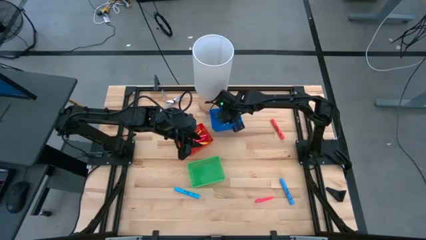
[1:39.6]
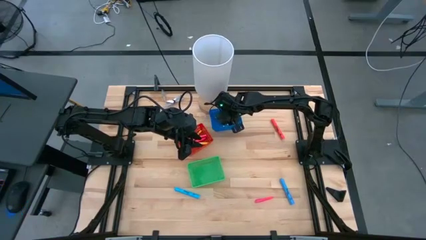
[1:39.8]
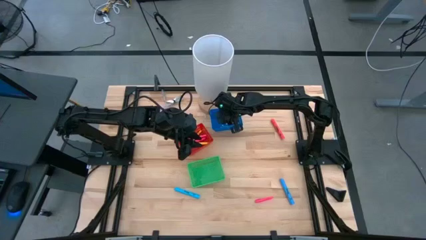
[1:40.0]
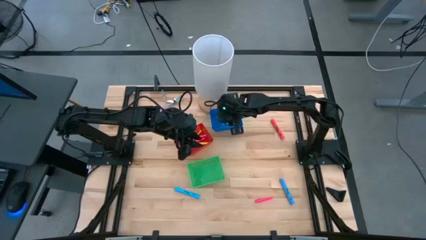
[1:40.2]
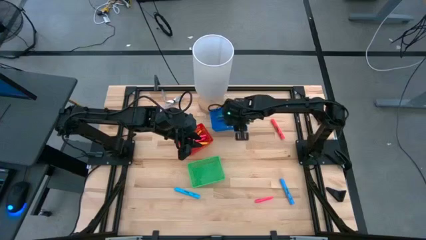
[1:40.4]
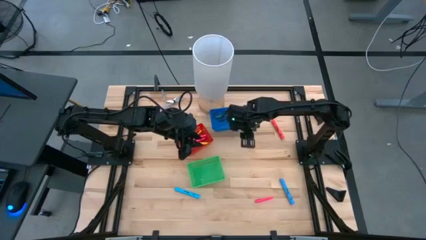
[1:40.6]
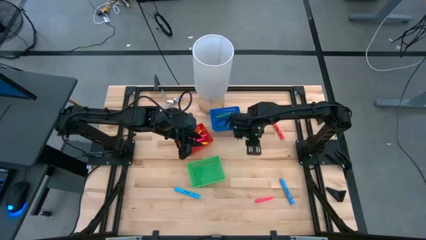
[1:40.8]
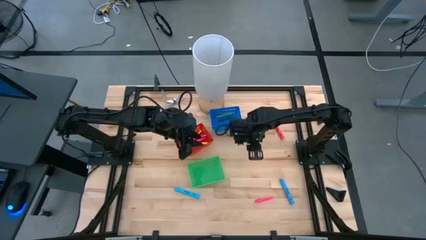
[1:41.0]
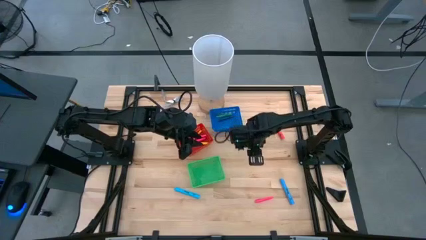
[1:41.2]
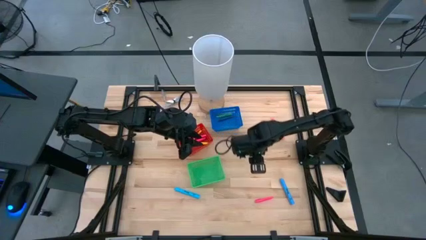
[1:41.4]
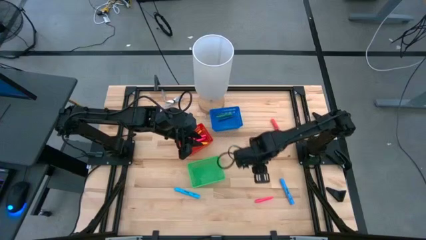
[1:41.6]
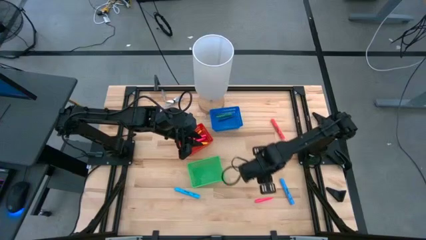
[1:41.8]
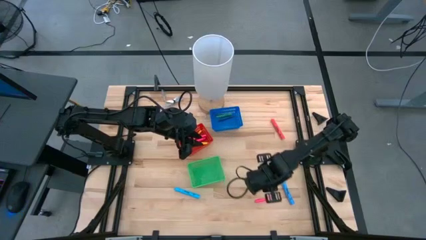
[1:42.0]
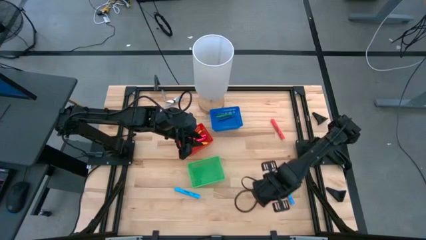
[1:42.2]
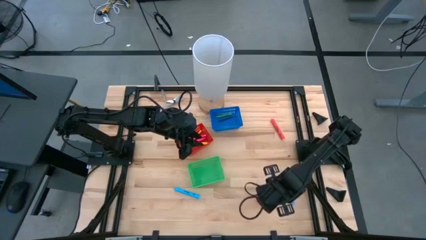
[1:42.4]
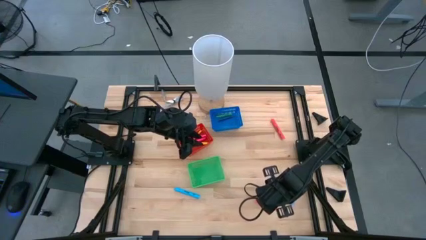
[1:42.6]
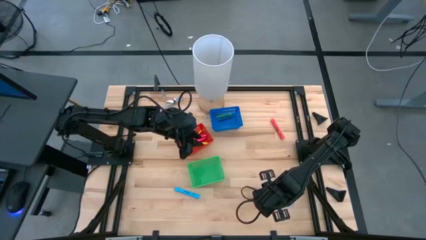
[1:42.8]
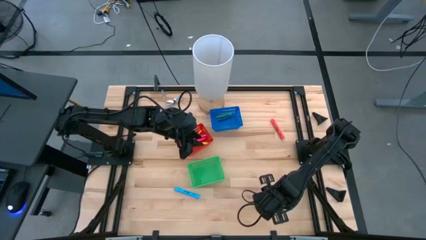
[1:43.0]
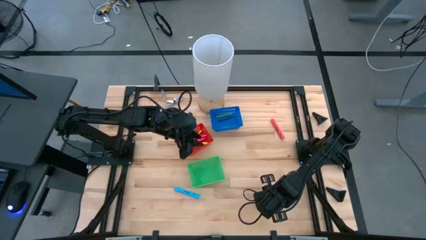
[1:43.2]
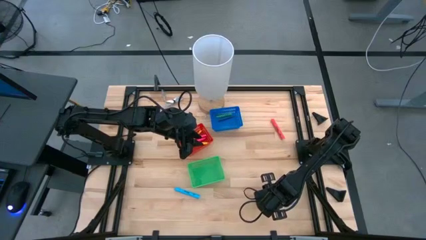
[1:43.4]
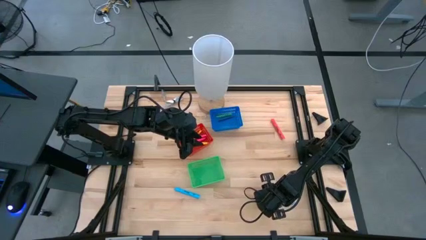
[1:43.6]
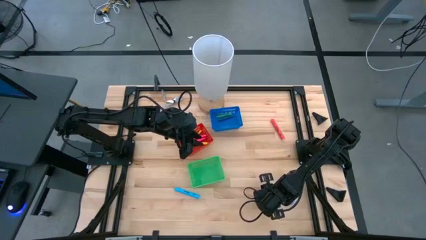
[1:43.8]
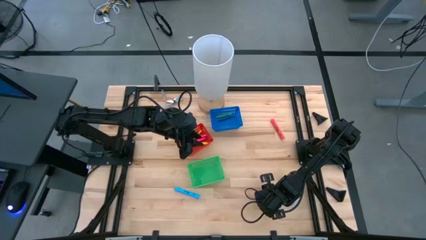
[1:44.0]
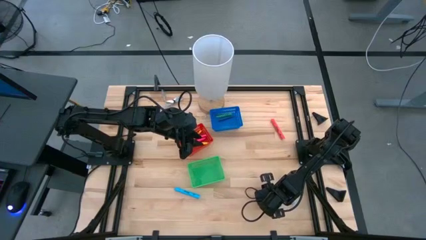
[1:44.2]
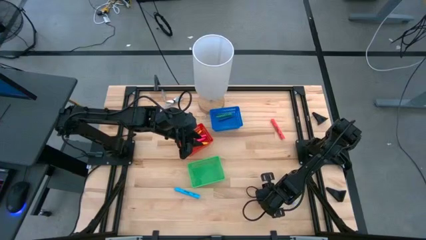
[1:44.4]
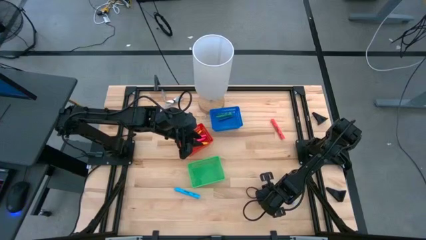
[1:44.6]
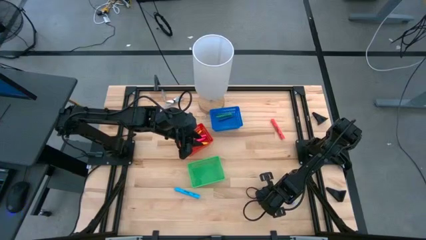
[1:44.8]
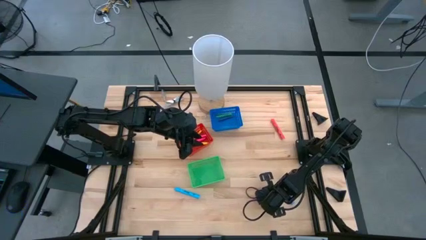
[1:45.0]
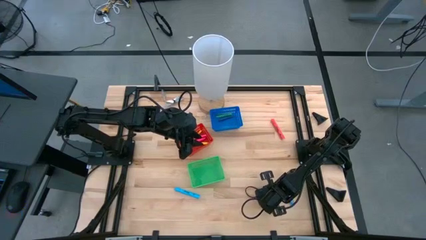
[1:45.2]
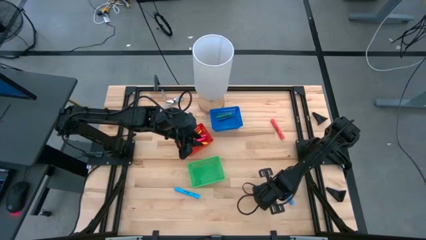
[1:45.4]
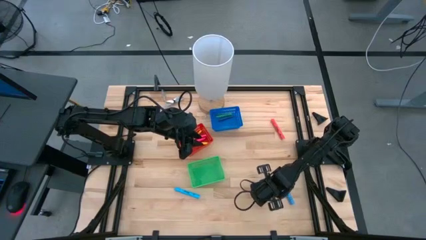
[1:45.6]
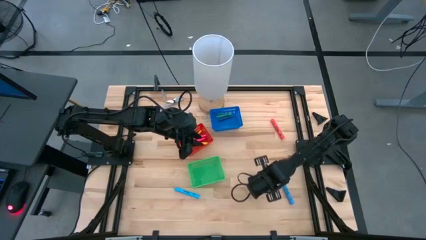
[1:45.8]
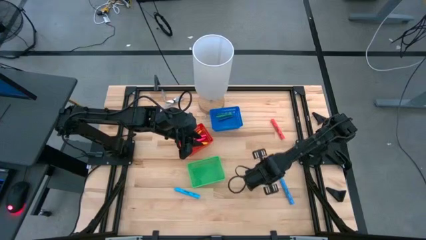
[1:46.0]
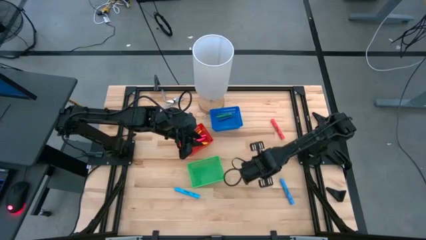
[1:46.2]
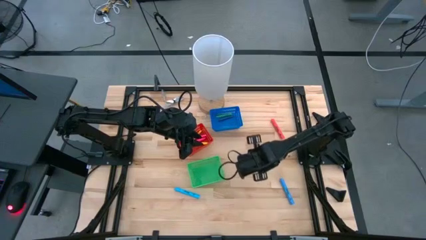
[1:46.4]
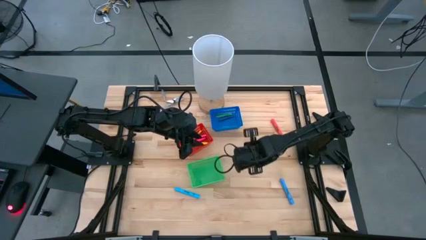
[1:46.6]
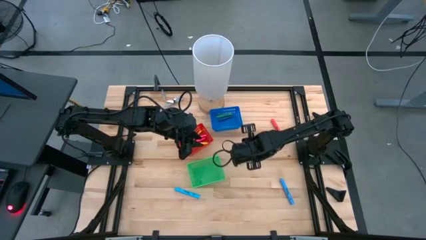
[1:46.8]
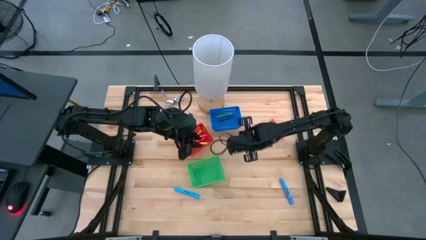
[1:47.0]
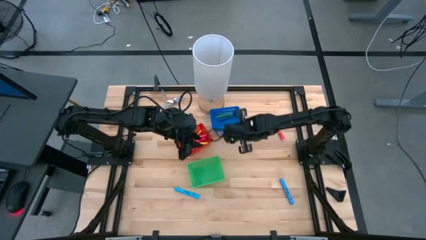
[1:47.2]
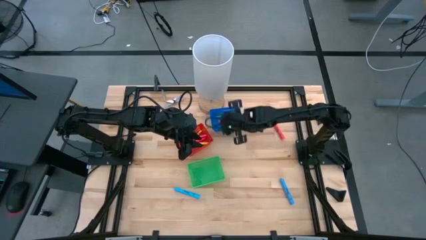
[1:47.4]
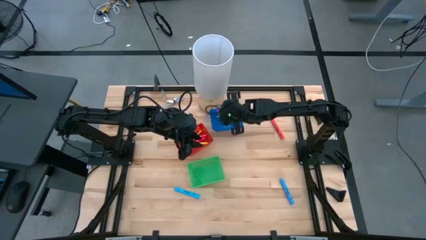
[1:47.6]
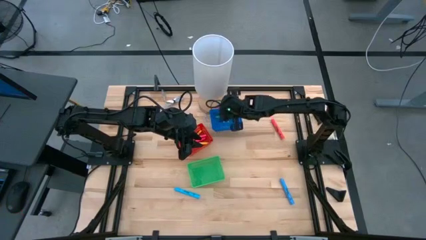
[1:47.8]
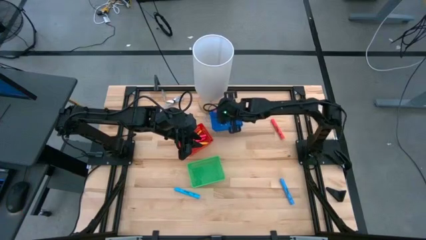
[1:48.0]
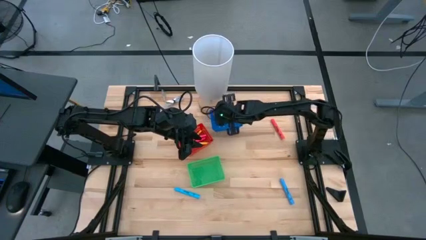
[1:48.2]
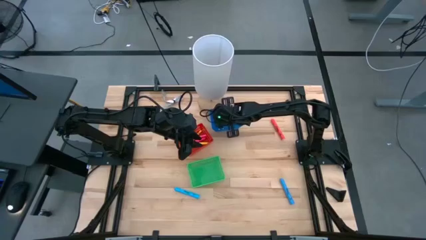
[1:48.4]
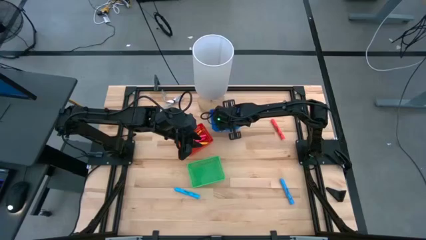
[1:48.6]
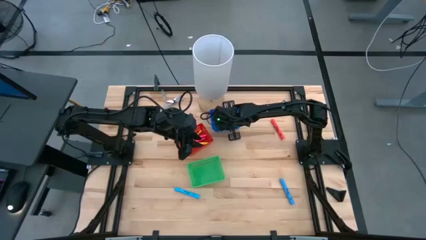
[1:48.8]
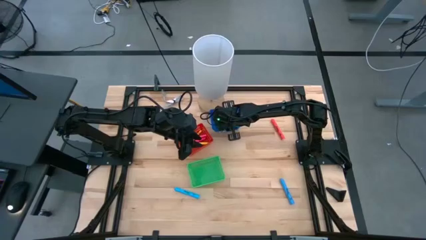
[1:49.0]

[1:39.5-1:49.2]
Task: Pick & Place Markers
Put the pink pen into the blue bin

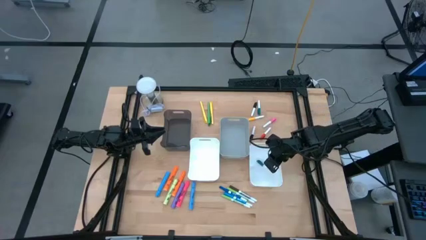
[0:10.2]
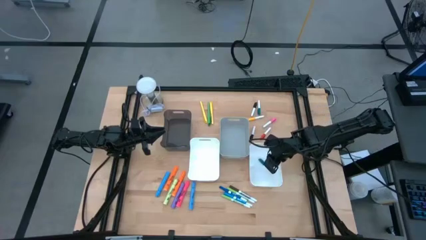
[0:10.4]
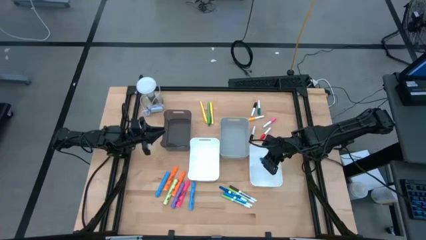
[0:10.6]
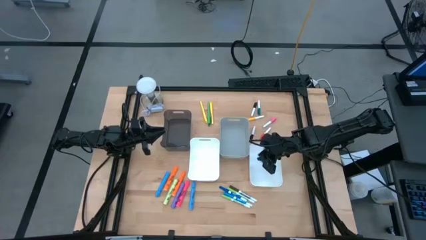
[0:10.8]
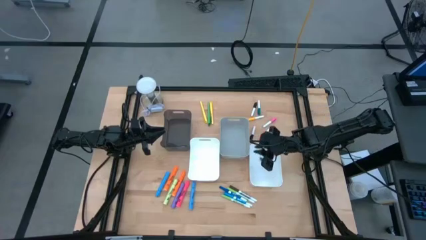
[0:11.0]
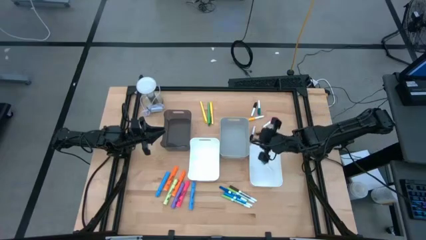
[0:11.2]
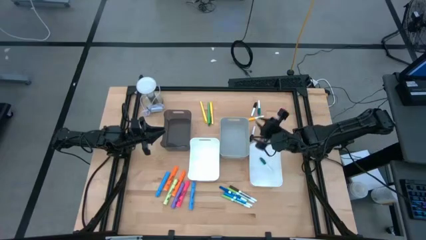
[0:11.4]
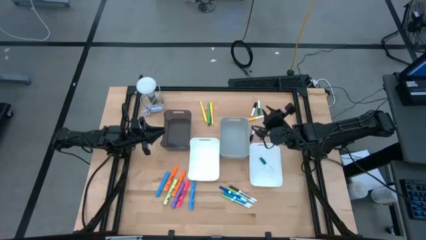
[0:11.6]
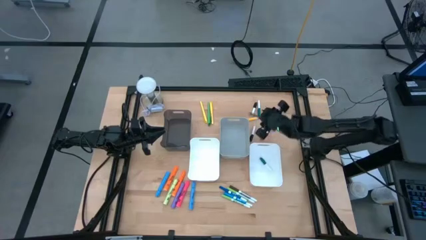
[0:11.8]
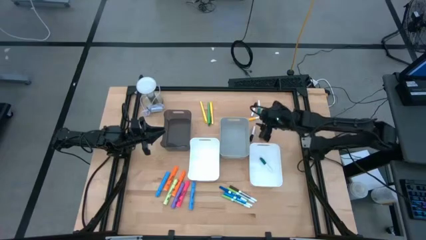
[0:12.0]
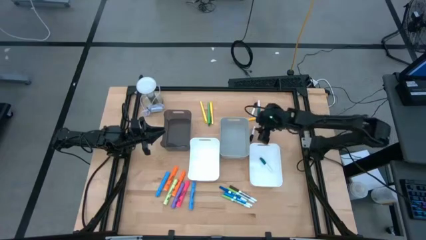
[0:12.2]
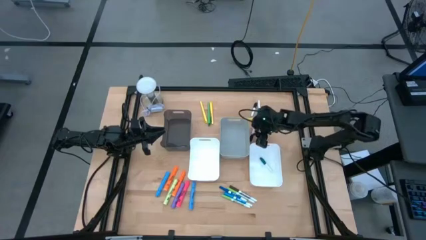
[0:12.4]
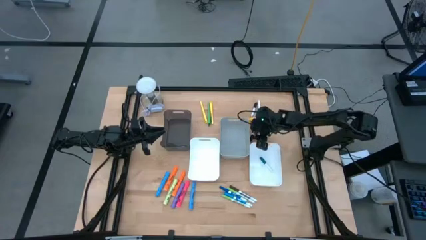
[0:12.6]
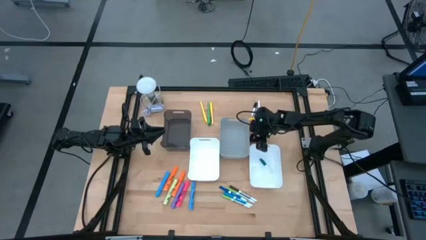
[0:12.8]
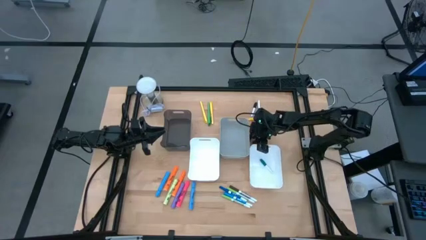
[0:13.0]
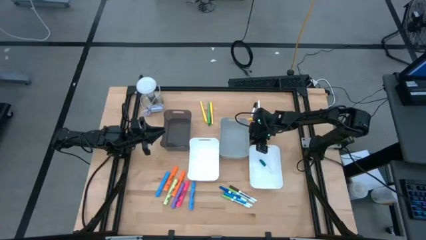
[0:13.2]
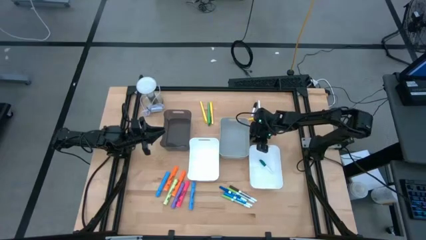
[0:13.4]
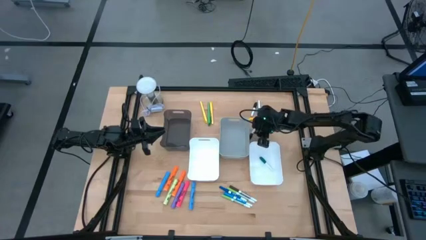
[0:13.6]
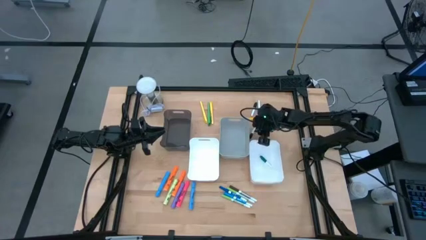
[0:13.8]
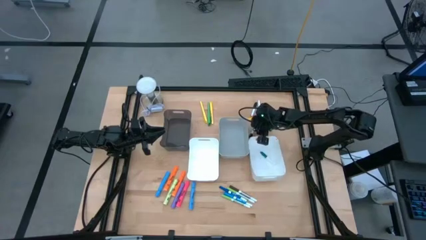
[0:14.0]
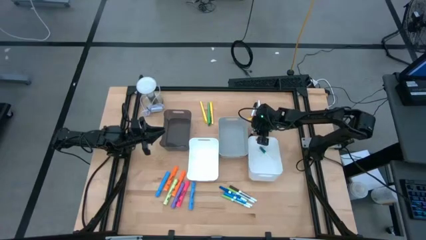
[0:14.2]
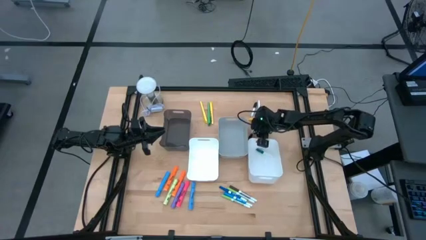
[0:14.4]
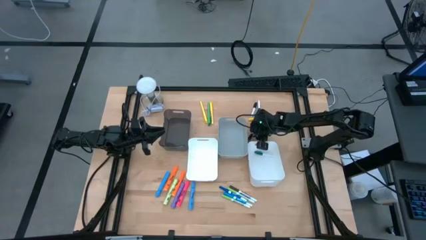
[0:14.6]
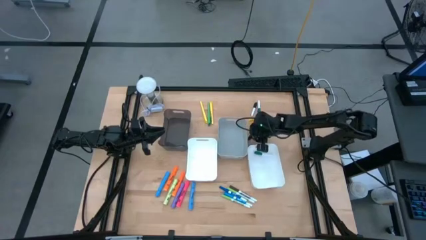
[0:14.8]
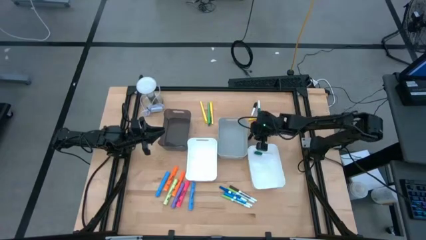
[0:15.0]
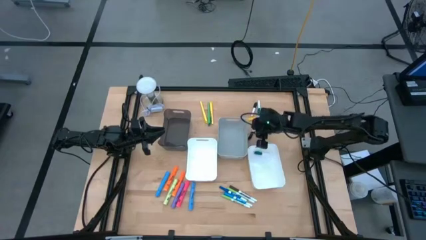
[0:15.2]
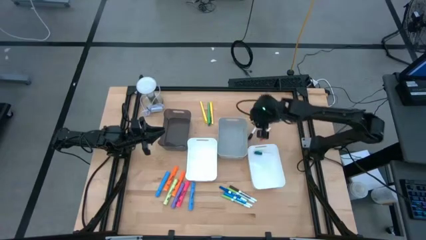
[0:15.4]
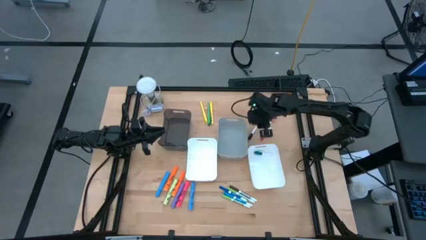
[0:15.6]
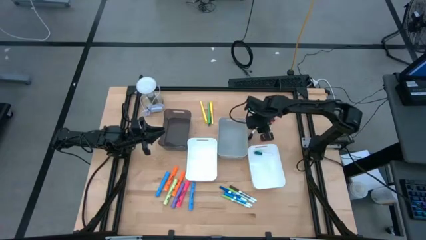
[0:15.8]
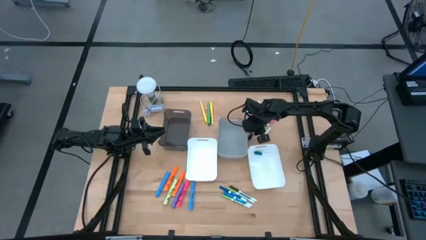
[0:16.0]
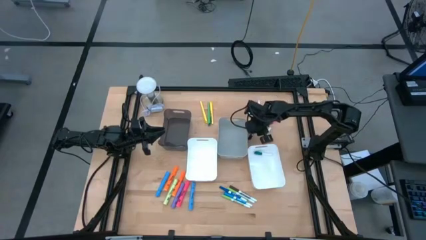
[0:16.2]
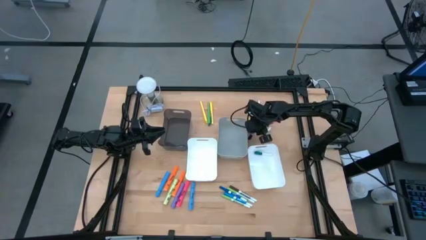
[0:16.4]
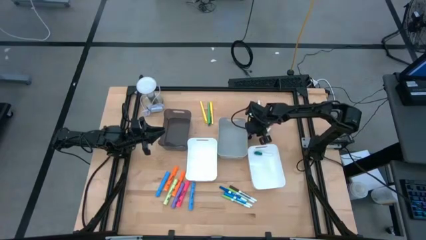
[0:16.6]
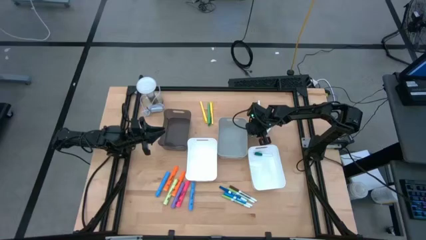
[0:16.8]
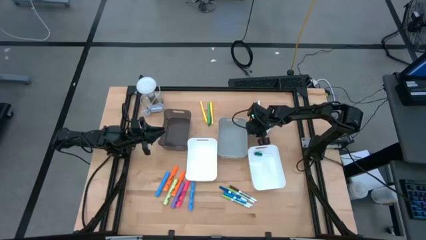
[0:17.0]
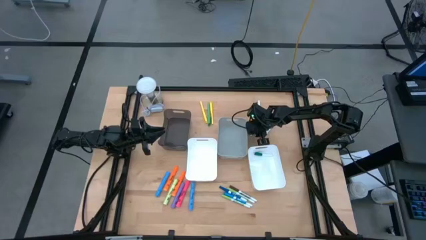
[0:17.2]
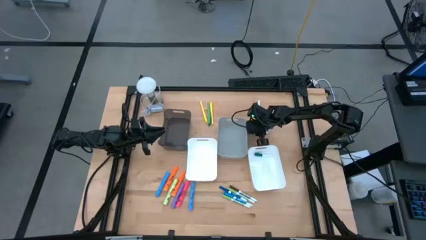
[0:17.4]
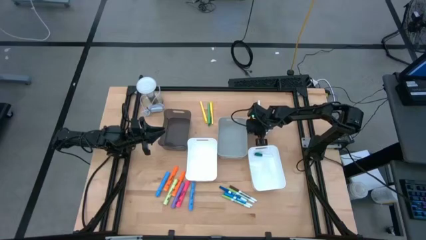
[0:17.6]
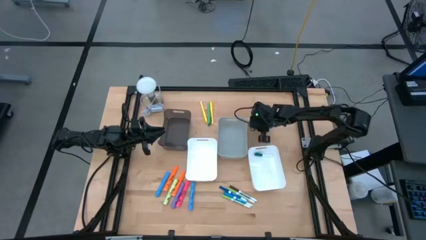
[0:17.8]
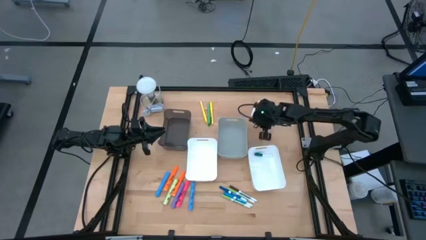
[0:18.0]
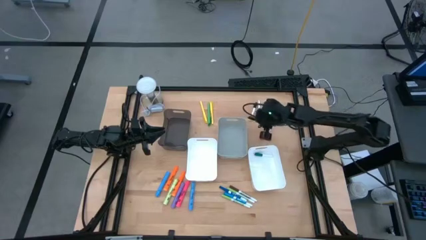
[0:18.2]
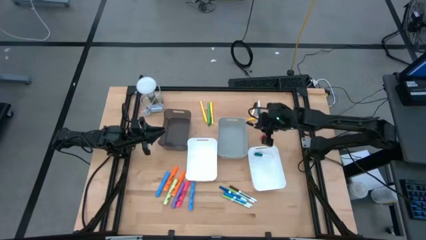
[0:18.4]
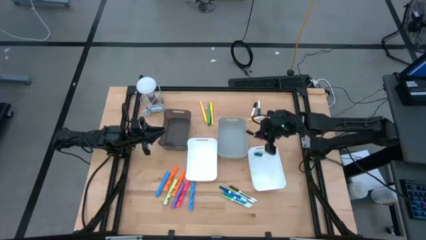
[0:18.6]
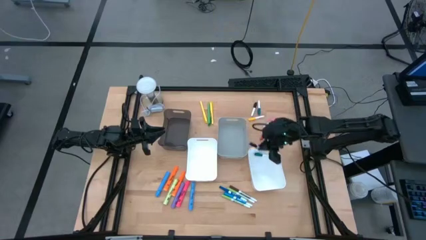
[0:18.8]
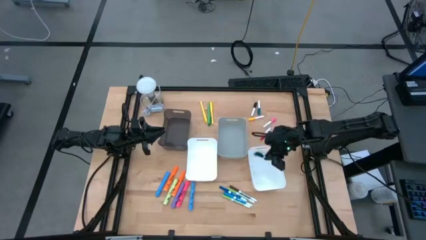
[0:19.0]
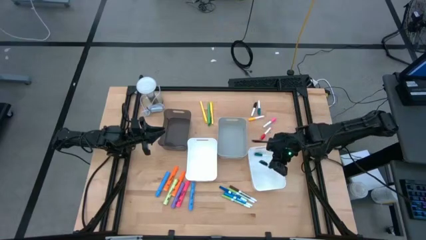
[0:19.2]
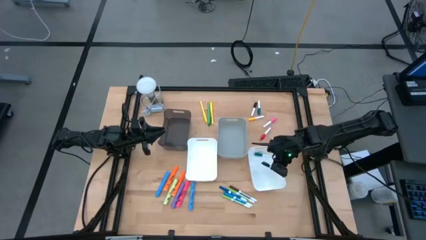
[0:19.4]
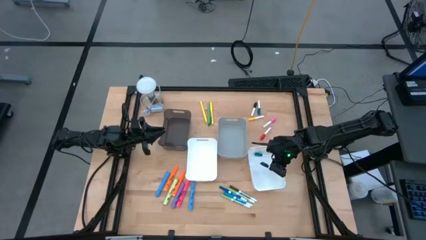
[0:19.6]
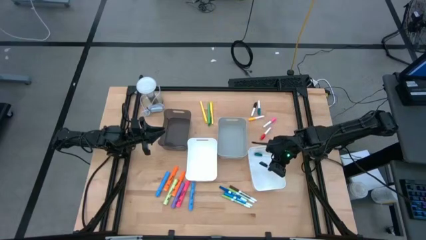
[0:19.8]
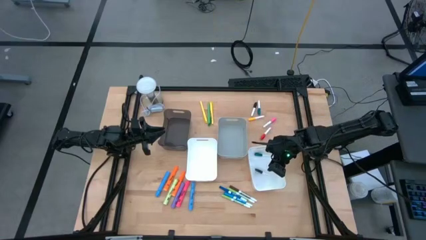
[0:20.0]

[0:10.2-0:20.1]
Task: Pick & Place Markers
Put the bottom black mini marker into the right white bin
